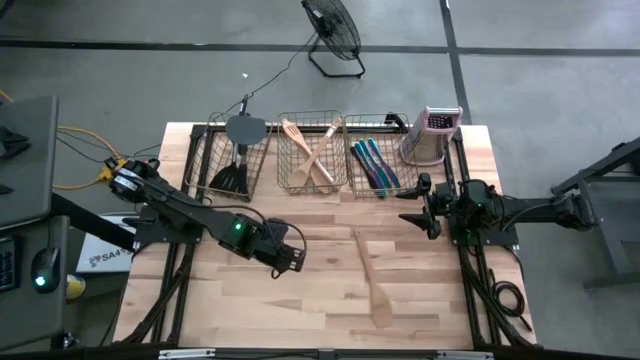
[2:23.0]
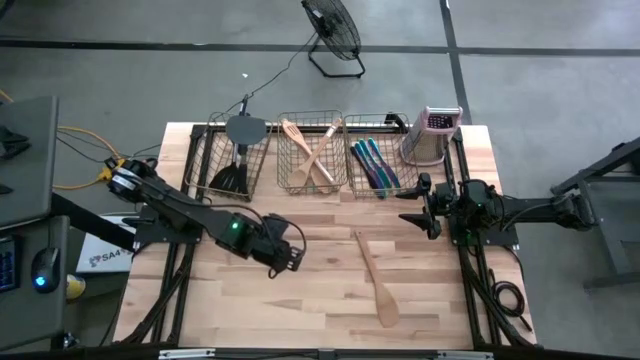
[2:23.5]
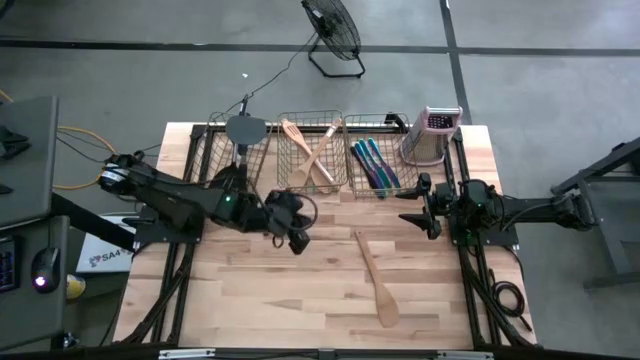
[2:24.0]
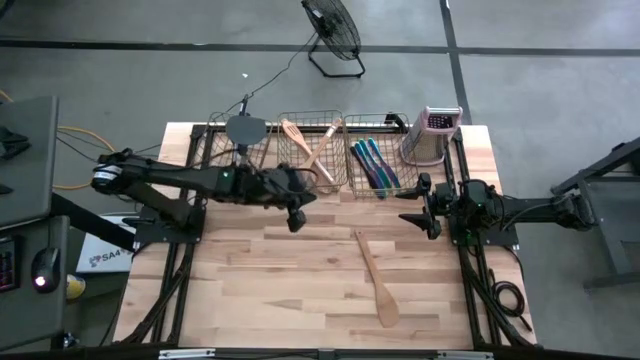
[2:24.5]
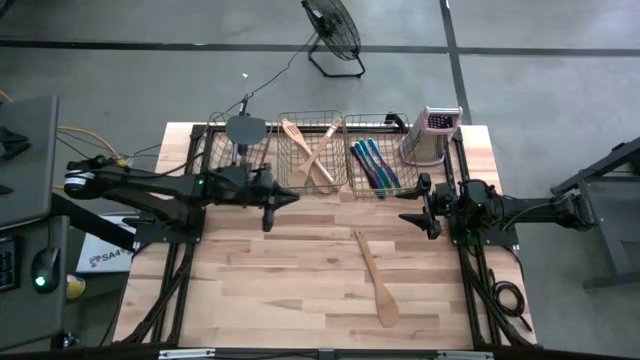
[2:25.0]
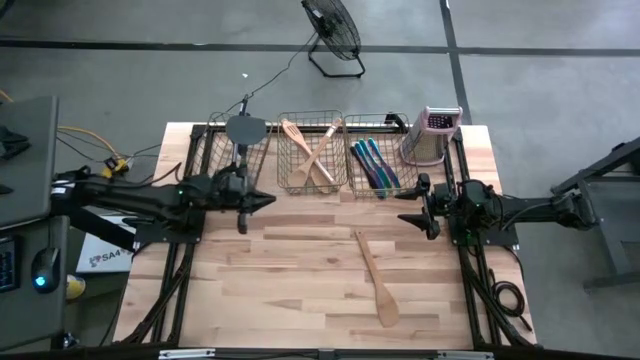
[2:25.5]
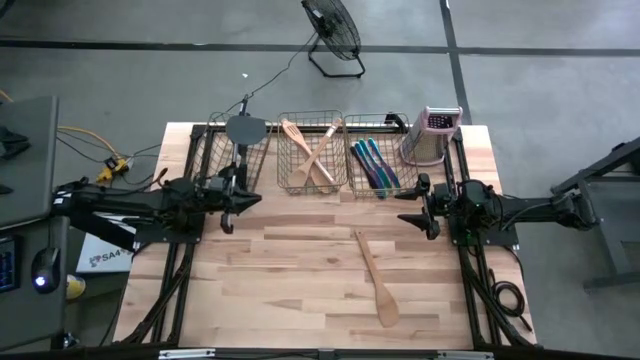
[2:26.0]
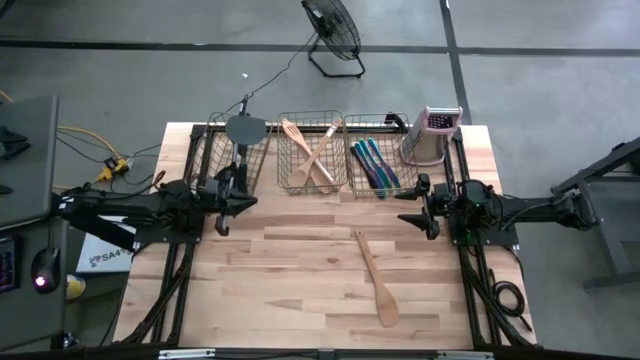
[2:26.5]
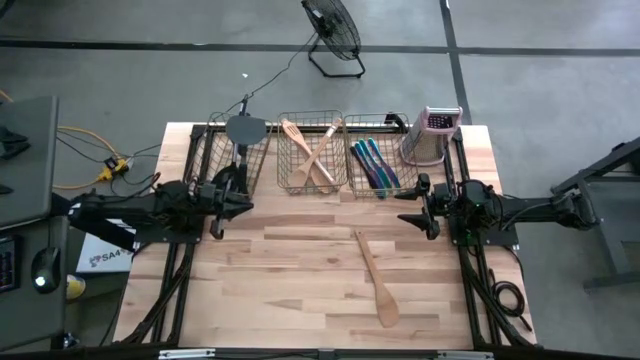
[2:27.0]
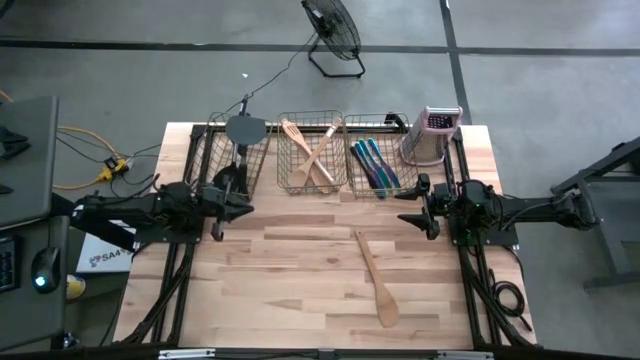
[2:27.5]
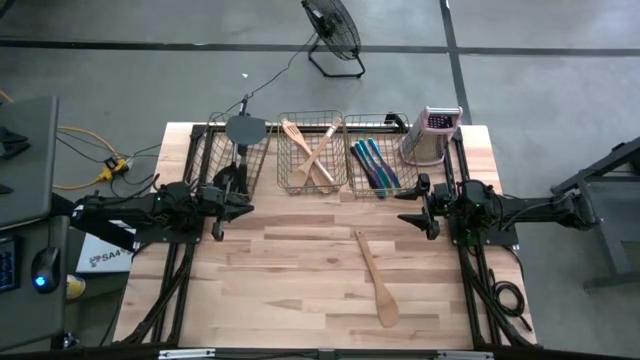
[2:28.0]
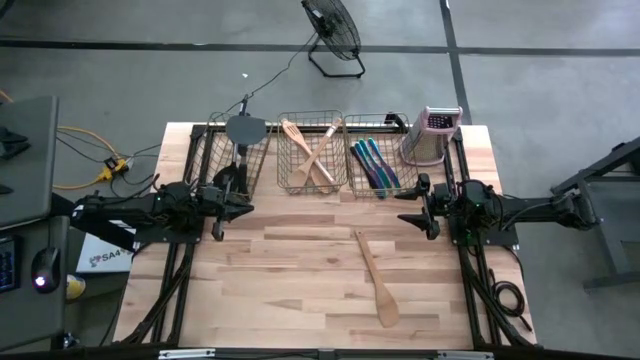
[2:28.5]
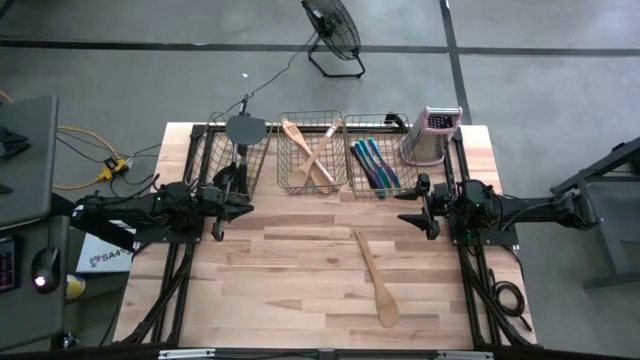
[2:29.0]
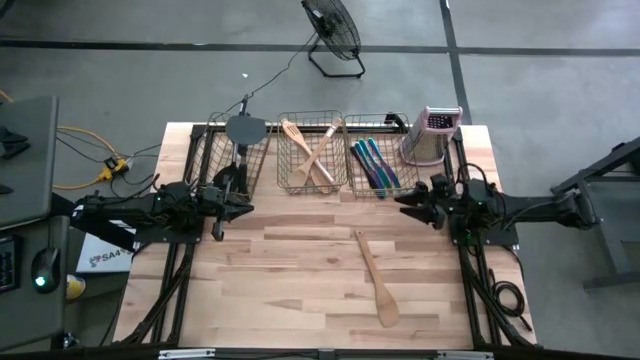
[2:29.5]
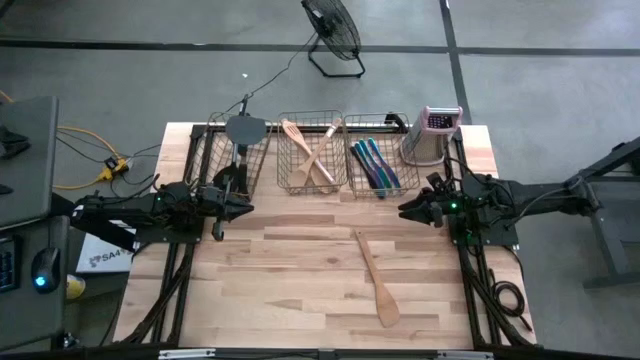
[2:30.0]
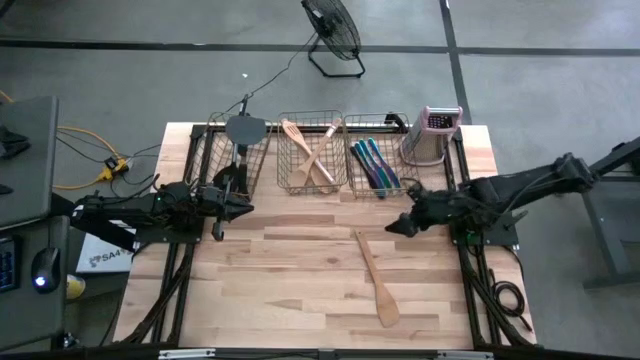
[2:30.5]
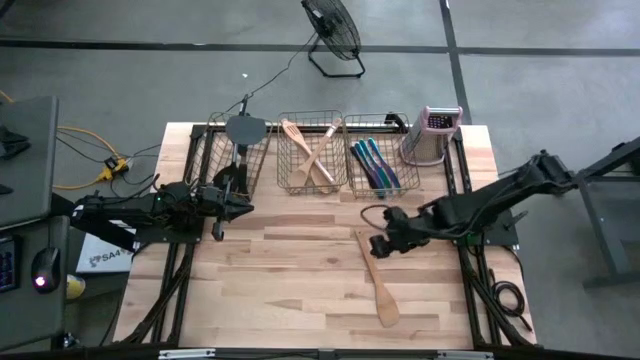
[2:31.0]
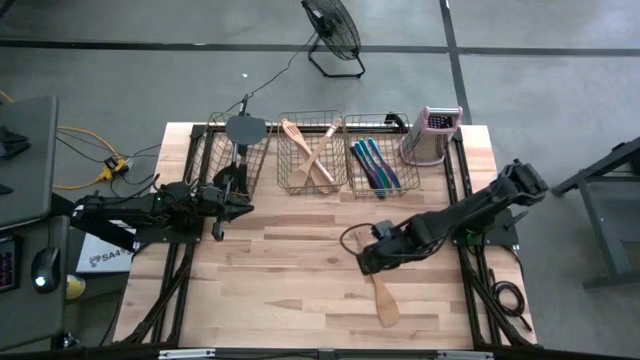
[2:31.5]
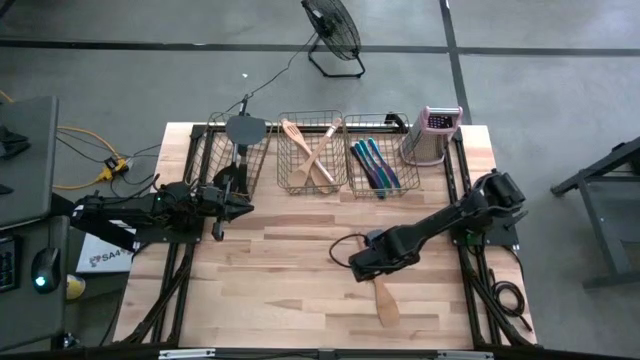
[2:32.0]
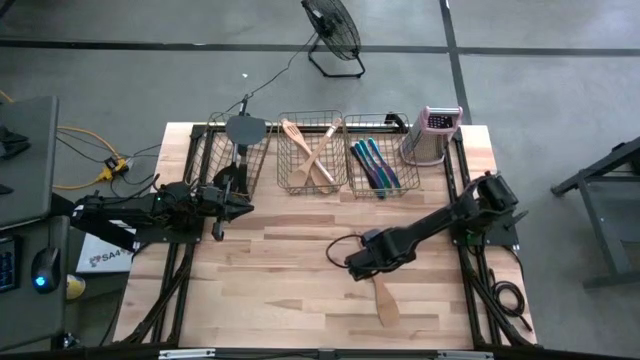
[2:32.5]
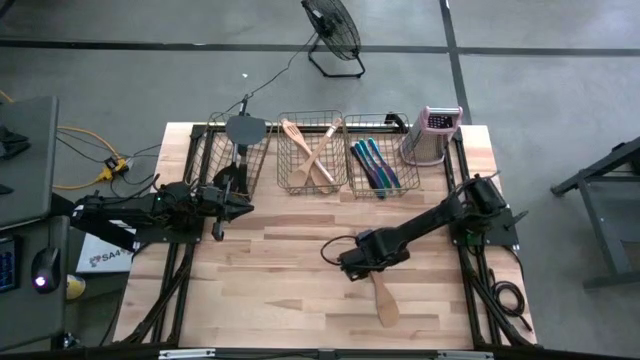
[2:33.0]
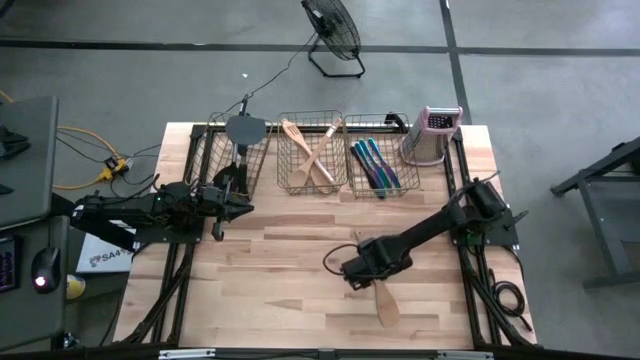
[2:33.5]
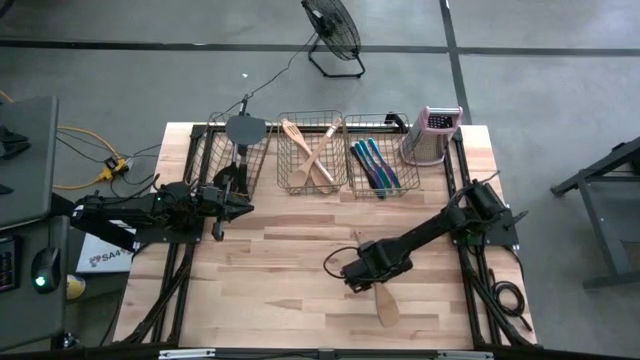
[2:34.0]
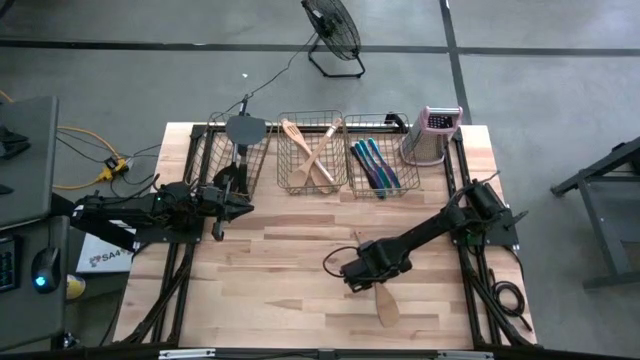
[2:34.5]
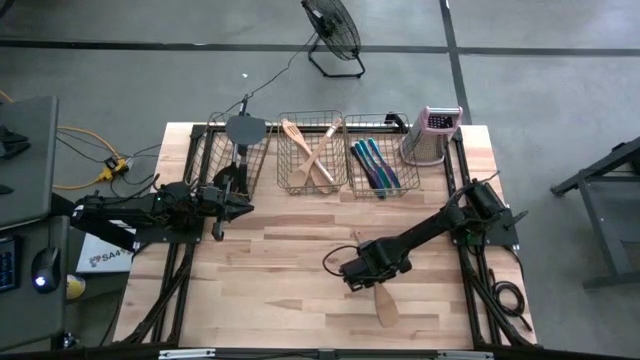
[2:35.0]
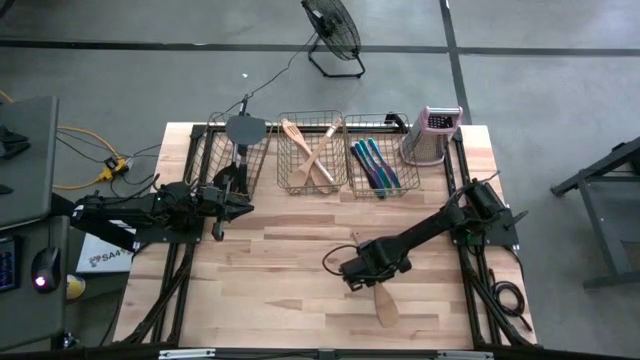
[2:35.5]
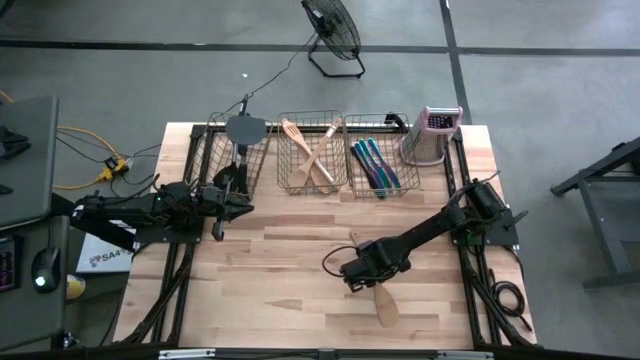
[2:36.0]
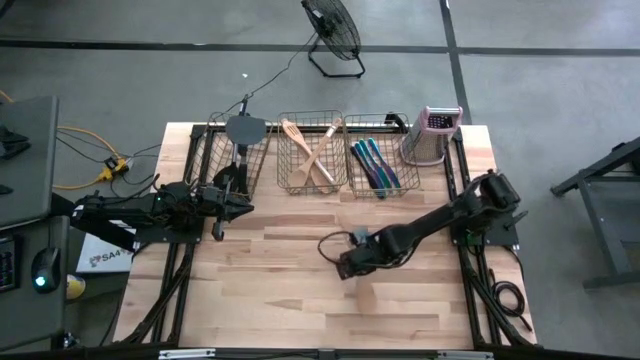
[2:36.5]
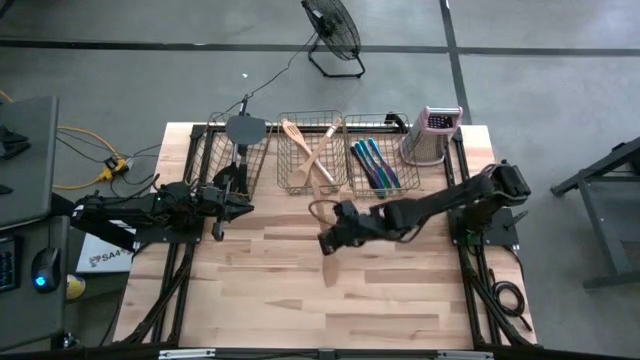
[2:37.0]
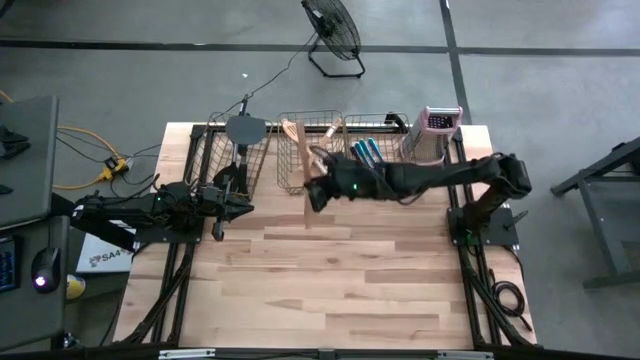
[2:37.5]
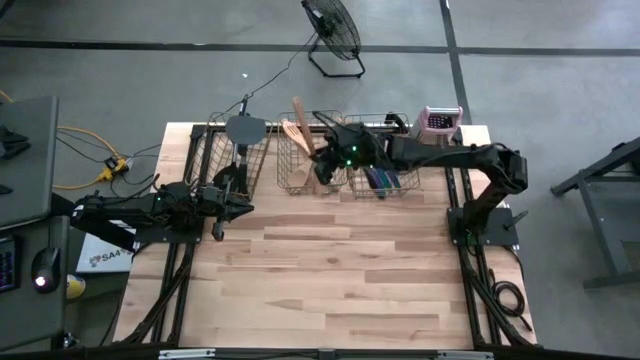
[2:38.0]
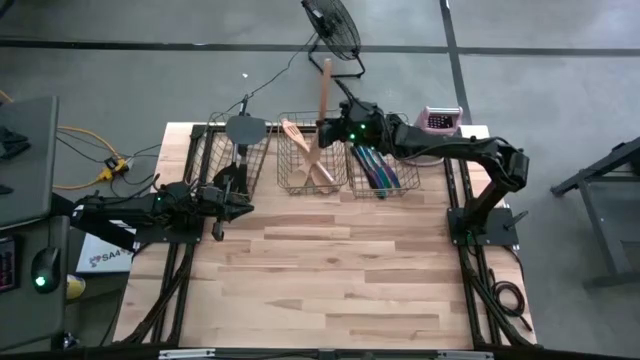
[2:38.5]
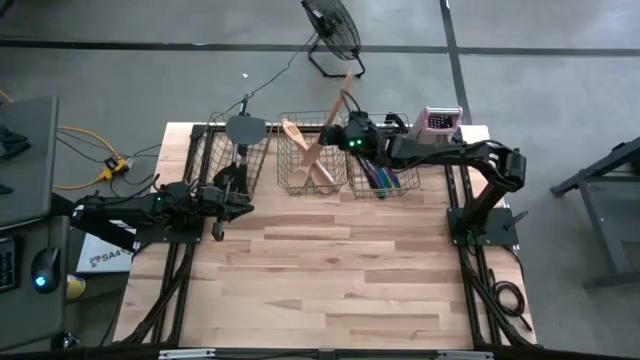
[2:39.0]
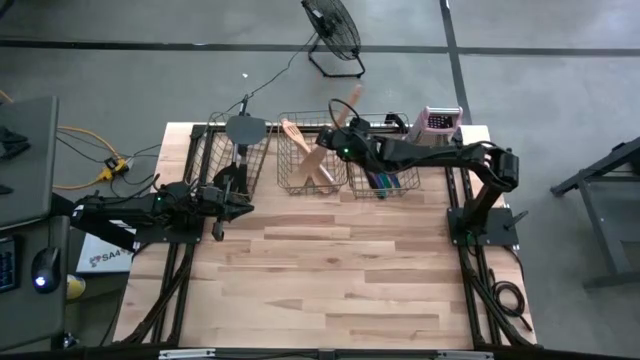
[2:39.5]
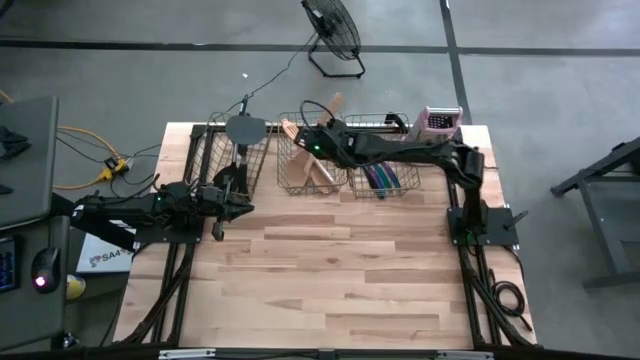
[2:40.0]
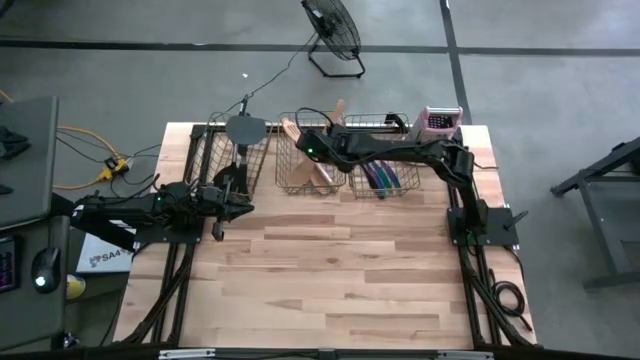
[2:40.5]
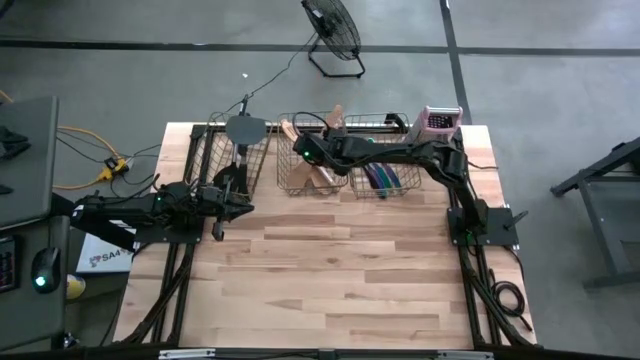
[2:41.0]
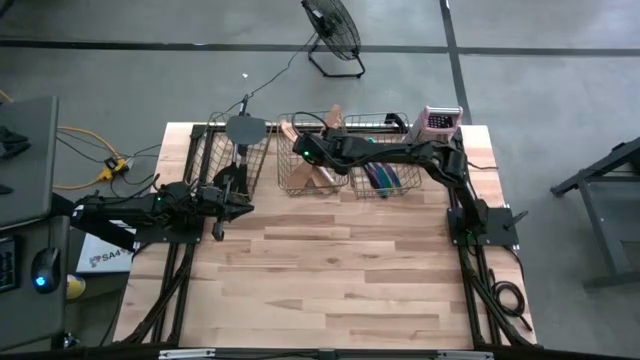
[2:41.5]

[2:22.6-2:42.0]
Task: Pick & Place Kitchen Items
Put the brown serving spoon into the middle wire basket

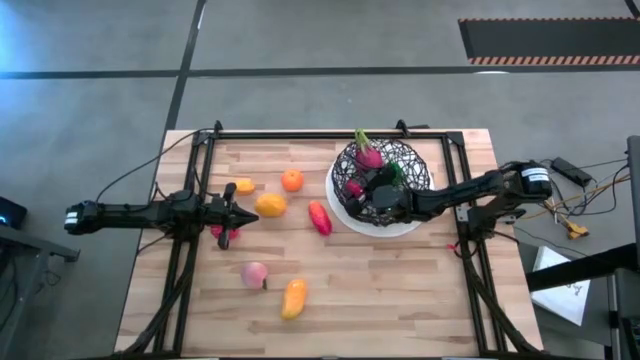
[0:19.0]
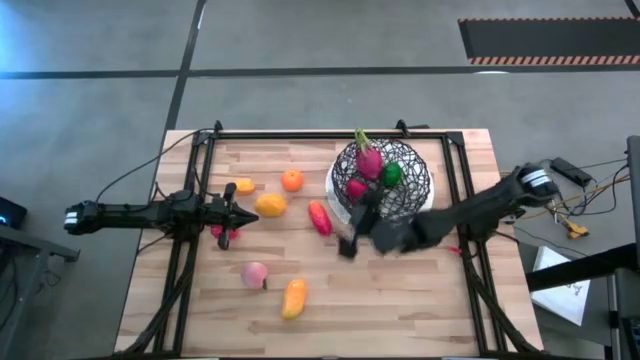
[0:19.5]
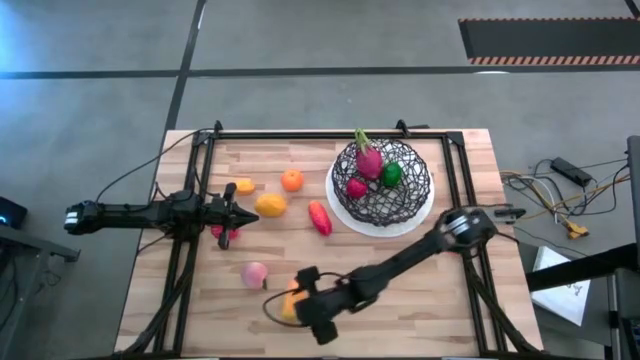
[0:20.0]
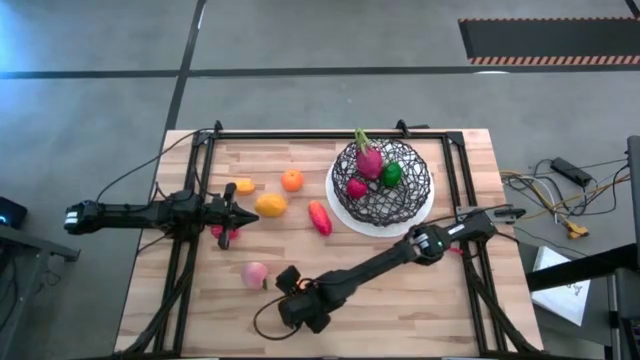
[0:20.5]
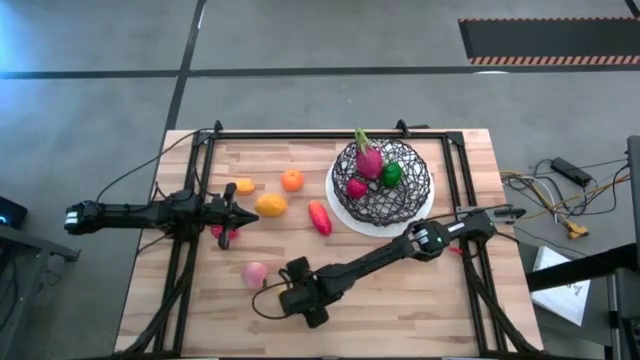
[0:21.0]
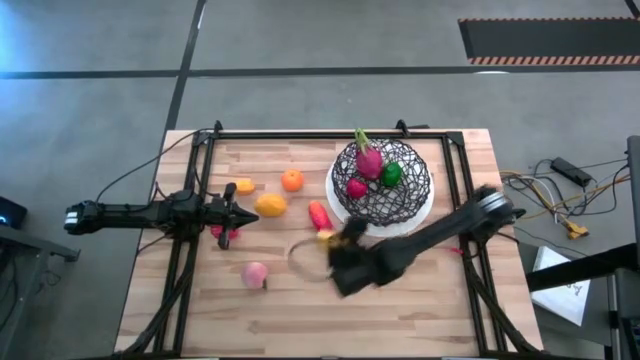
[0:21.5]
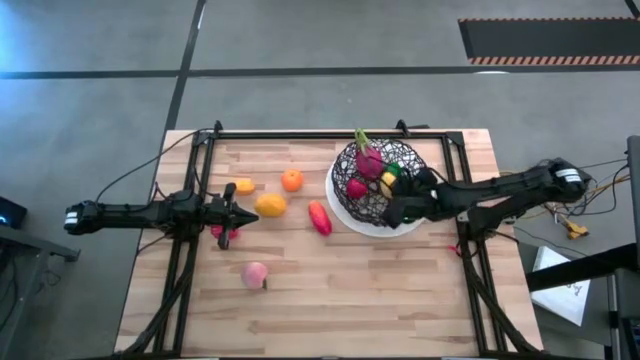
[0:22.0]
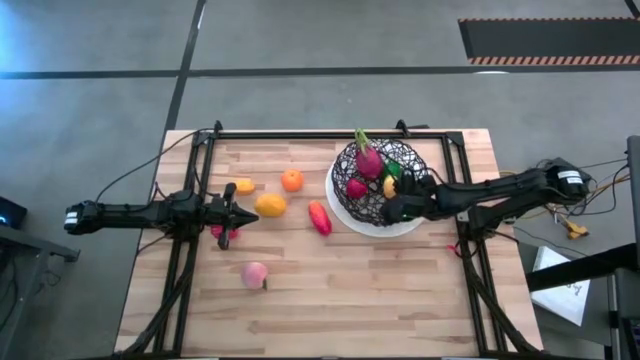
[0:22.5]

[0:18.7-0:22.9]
Task: Build produce basket
Put the bottom mango into the black basket
